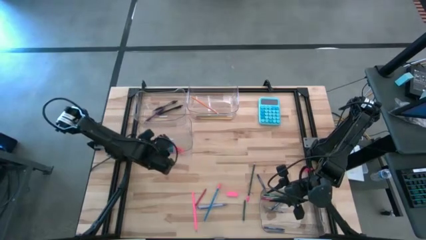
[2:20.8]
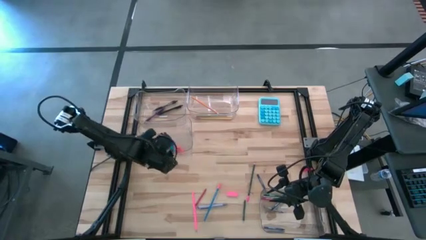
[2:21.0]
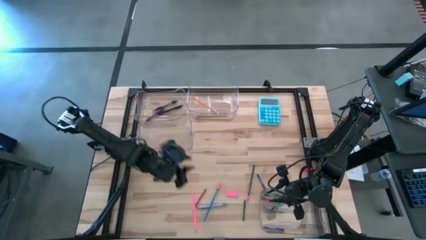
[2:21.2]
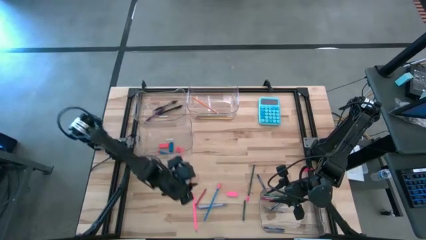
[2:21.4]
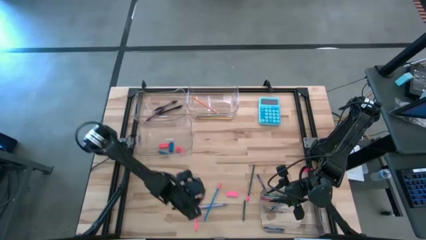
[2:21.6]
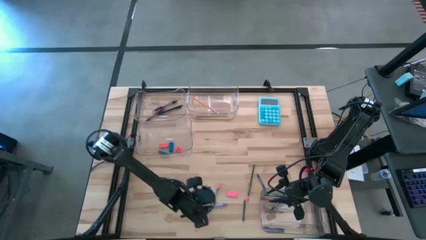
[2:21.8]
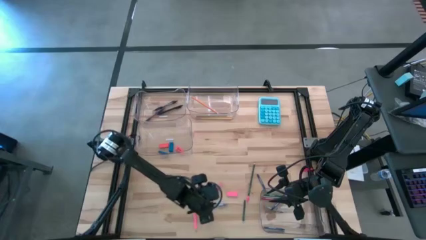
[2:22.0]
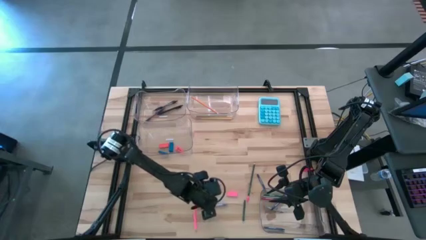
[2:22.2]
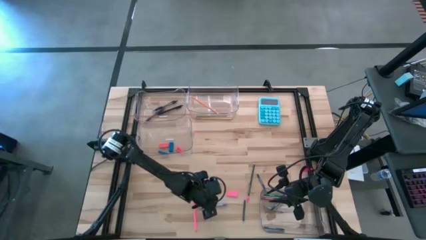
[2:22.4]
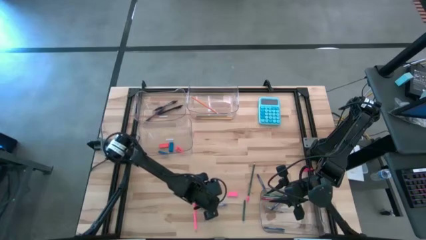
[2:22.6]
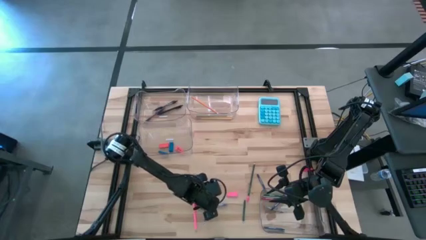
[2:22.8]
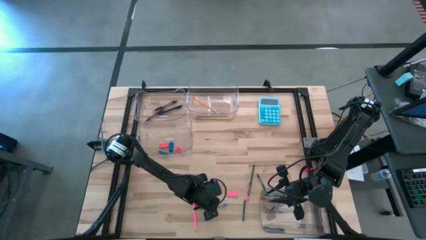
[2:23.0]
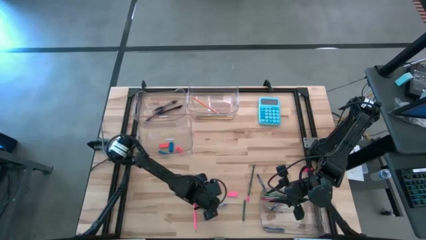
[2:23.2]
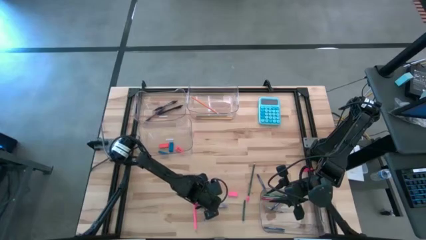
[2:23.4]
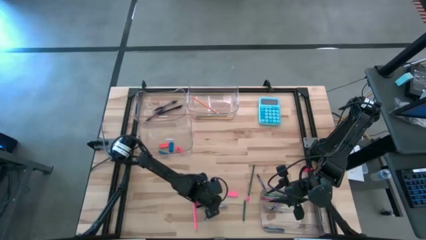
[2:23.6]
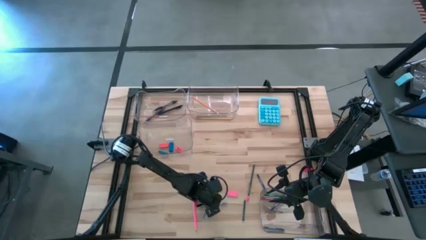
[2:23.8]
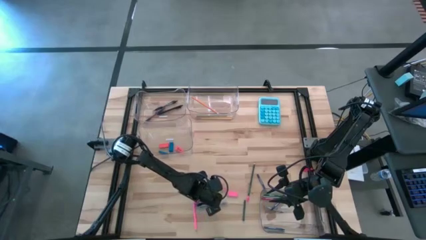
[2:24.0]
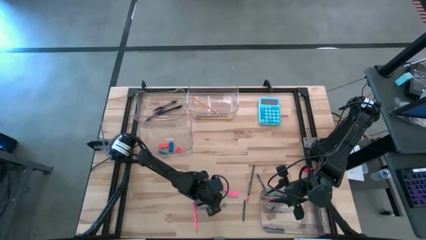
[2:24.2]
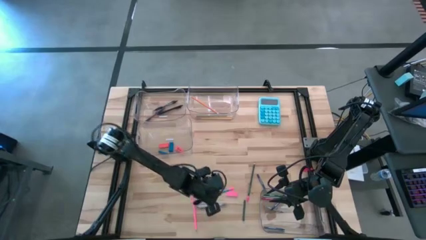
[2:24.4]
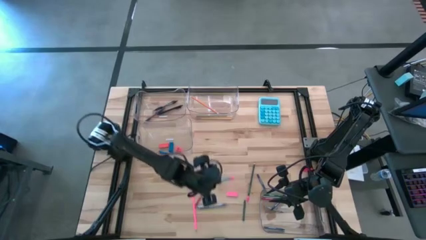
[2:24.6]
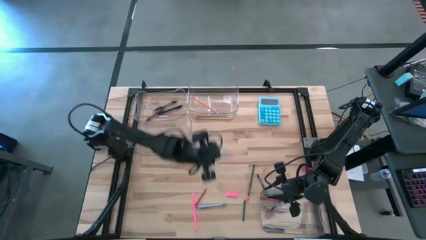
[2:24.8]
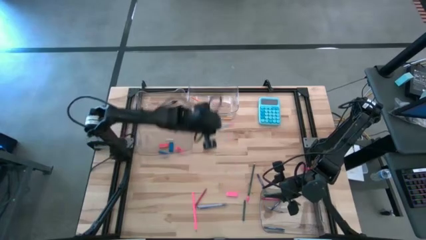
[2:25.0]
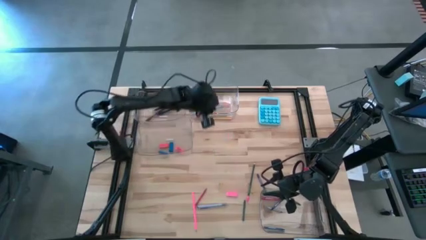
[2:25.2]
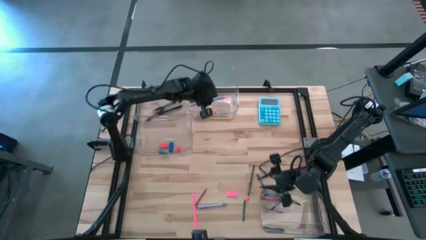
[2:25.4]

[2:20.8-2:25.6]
Task: Sort crayons/erasers/pens/pencils in bins
Put the light blue pencil into the top right transparent bin

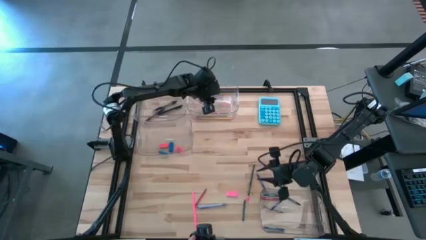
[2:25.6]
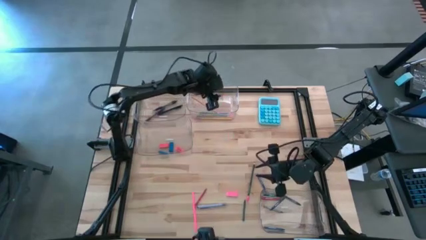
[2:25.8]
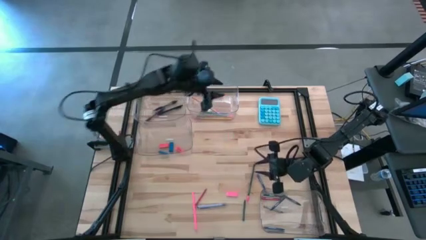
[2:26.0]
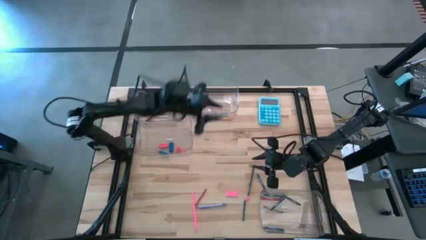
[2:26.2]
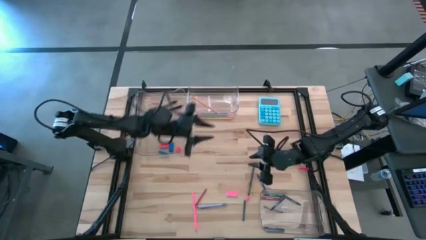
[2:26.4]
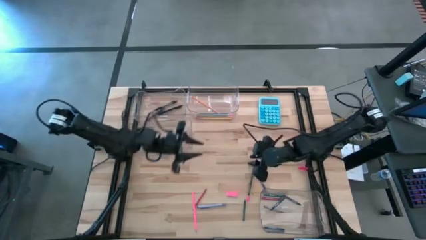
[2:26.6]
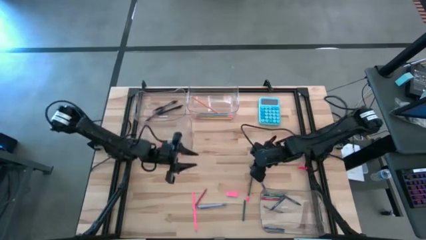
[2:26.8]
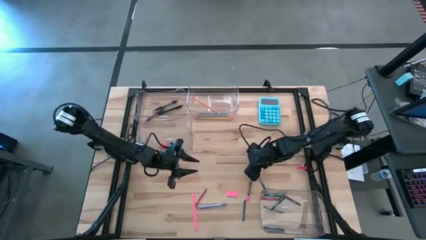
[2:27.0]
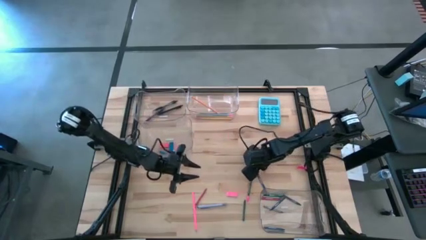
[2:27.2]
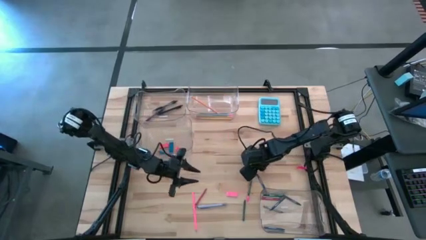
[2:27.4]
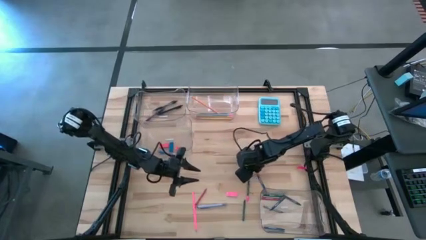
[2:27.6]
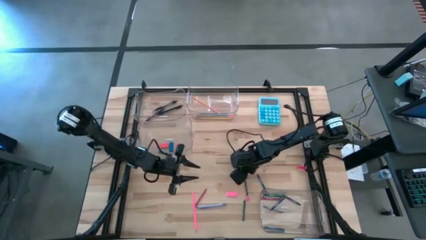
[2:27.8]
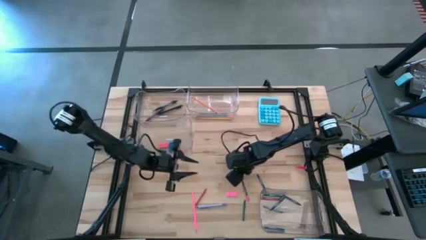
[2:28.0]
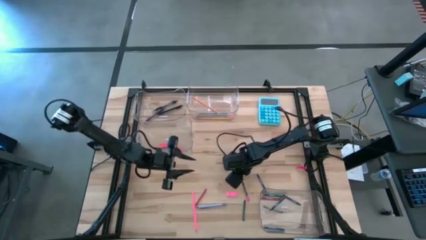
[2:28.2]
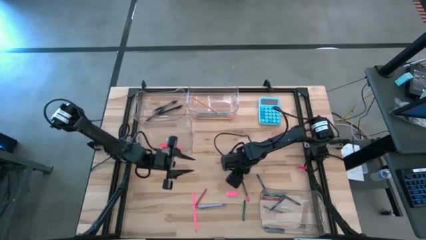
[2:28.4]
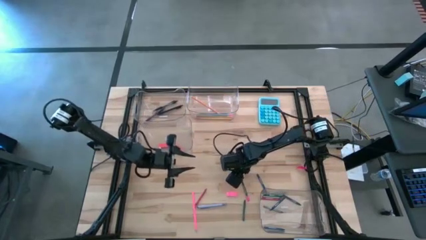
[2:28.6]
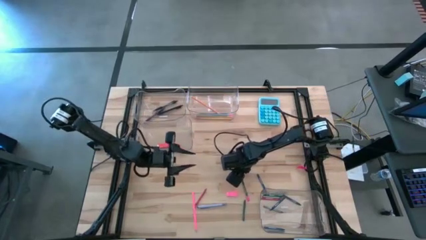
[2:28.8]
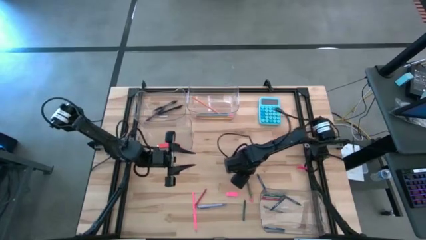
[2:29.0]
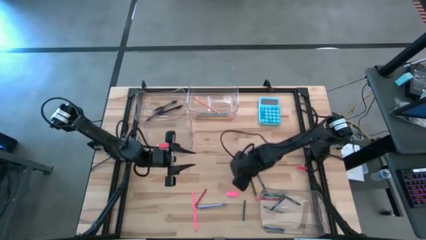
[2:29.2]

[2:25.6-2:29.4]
Put the green pencil into the top right transparent bin

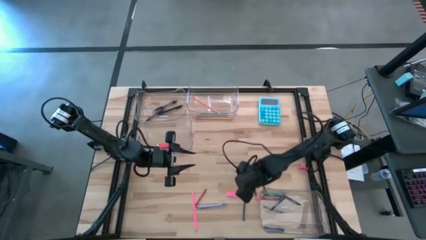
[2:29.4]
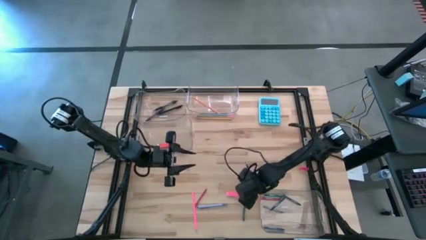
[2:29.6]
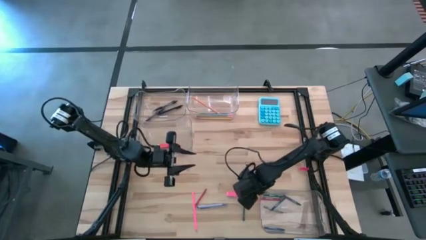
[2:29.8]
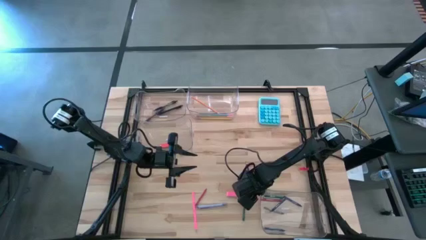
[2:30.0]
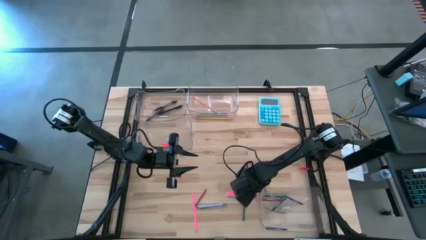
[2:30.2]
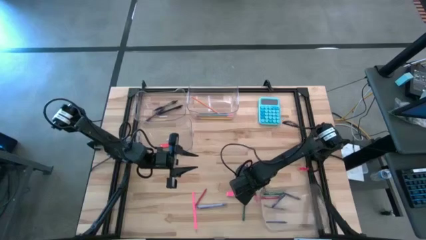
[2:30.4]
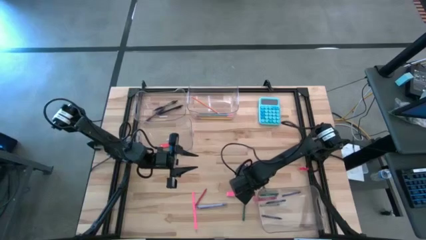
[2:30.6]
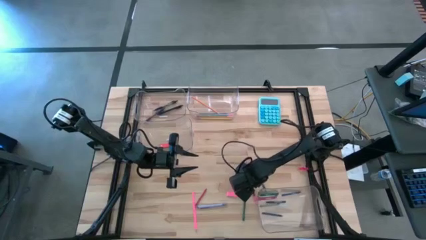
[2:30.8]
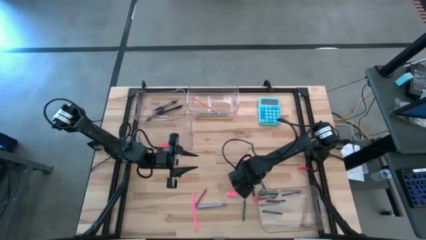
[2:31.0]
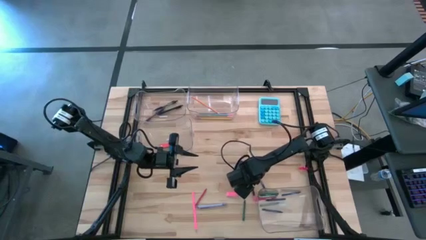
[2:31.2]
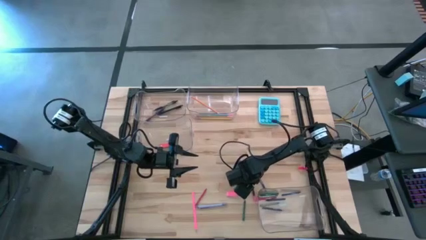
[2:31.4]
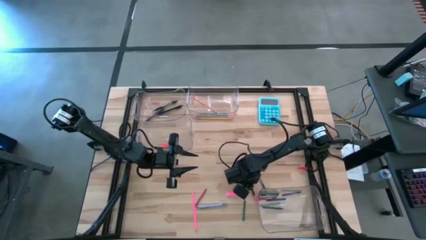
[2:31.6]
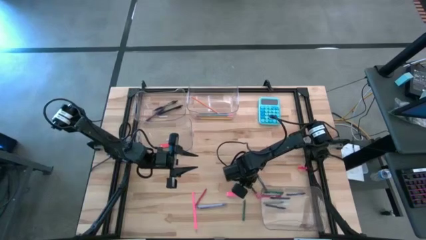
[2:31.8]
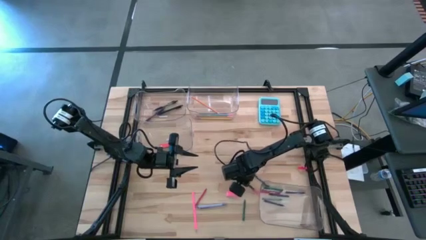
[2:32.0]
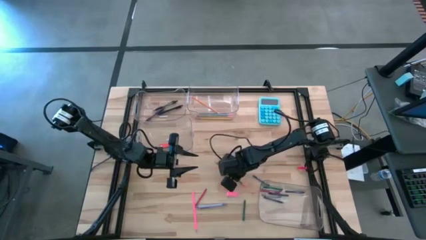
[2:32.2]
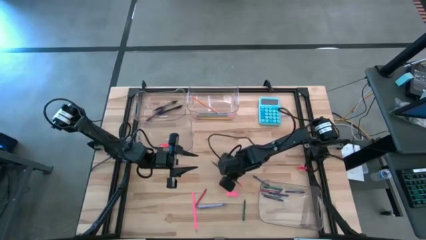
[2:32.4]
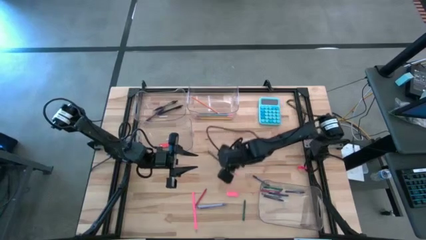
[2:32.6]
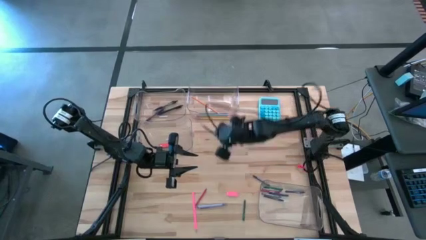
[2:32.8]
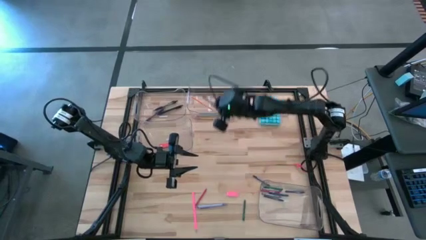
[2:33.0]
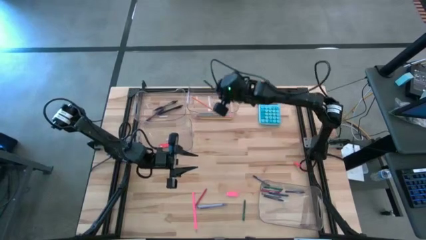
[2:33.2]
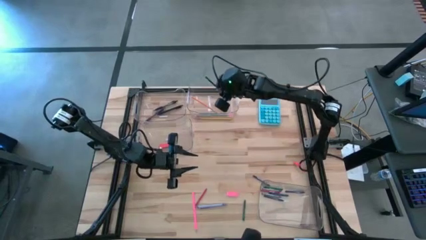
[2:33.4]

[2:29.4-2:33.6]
Put the green pencil into the top right transparent bin
